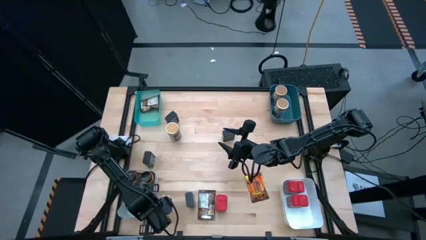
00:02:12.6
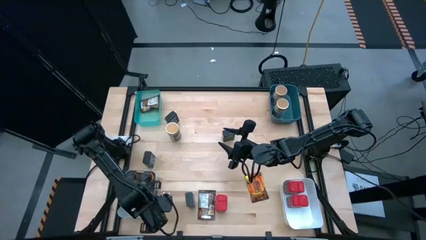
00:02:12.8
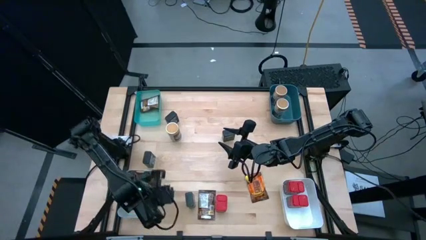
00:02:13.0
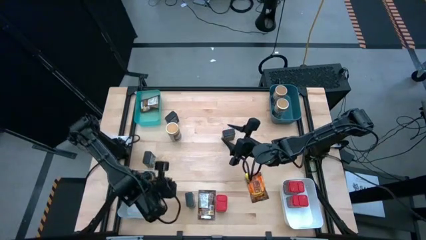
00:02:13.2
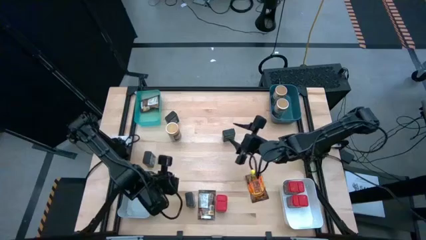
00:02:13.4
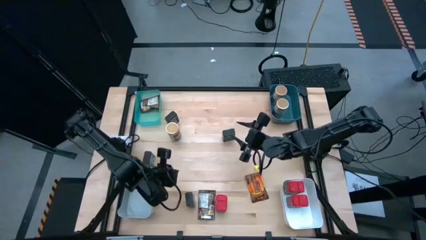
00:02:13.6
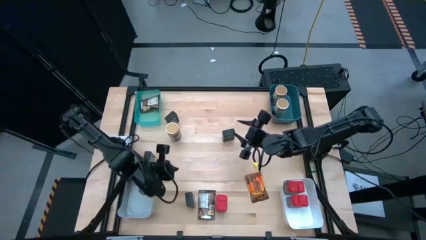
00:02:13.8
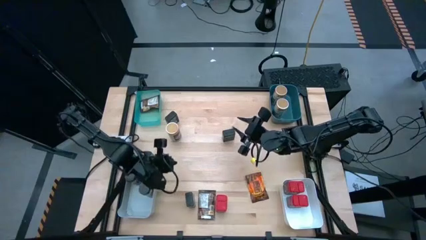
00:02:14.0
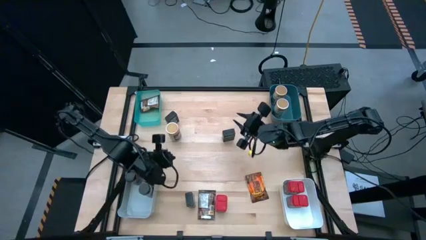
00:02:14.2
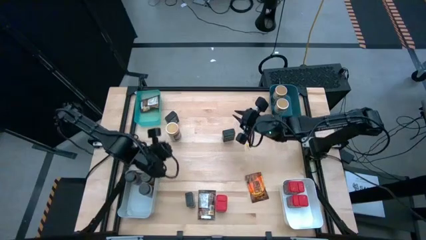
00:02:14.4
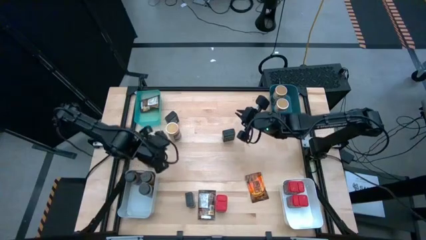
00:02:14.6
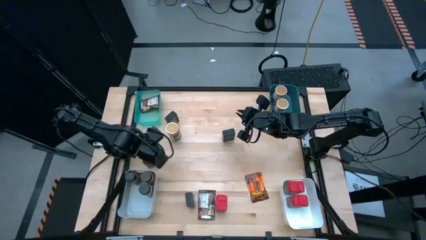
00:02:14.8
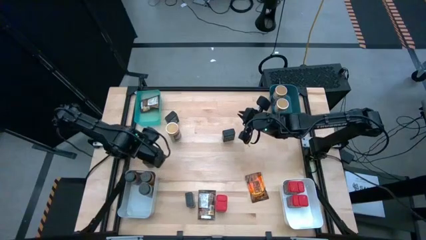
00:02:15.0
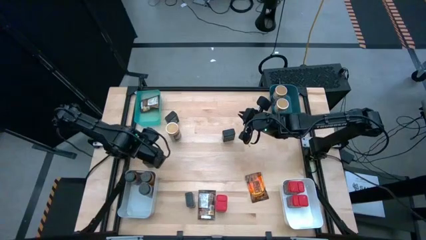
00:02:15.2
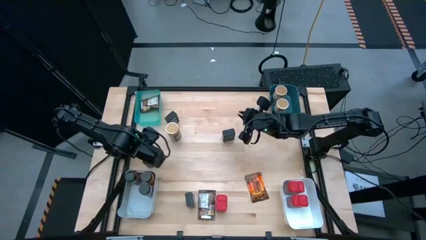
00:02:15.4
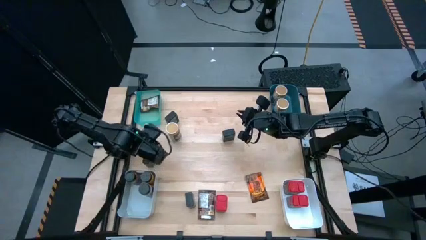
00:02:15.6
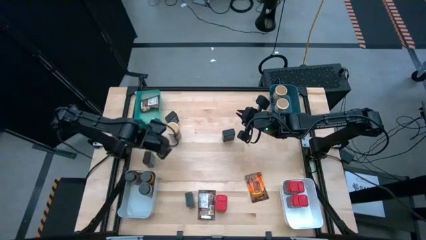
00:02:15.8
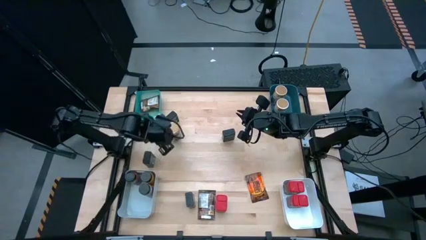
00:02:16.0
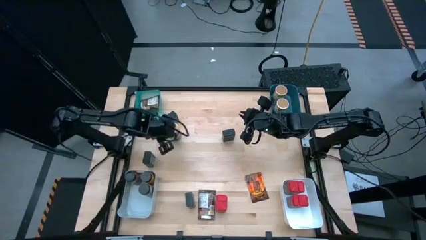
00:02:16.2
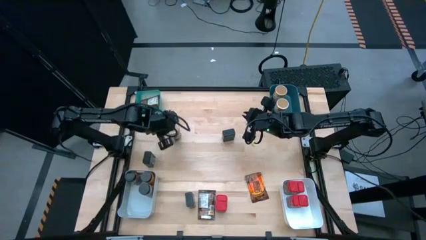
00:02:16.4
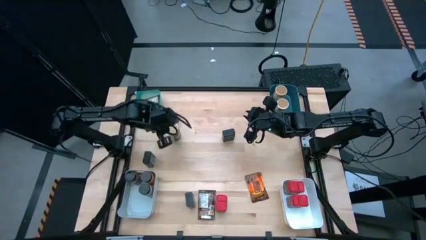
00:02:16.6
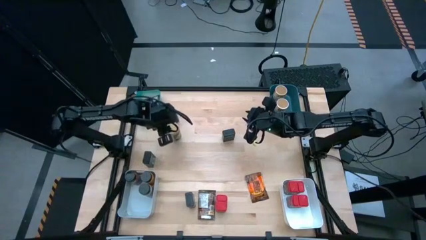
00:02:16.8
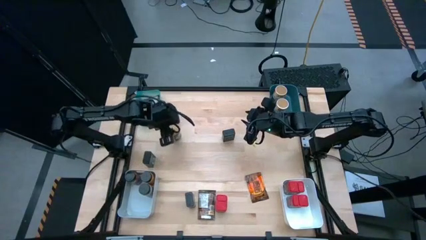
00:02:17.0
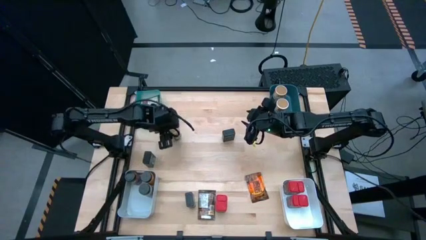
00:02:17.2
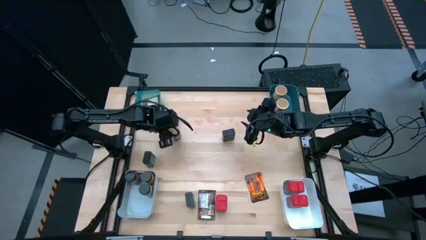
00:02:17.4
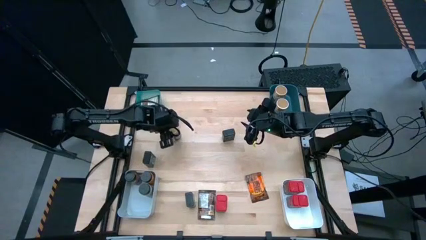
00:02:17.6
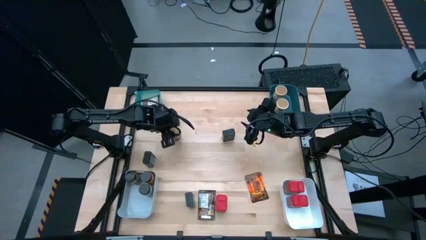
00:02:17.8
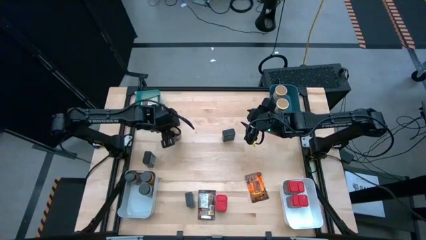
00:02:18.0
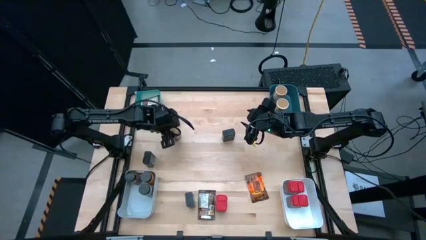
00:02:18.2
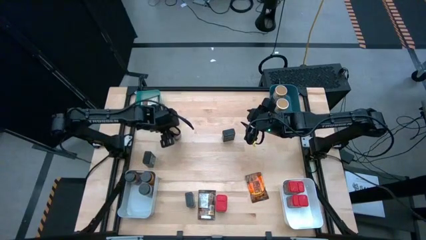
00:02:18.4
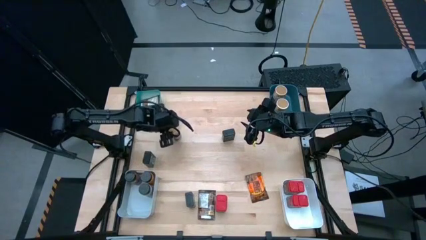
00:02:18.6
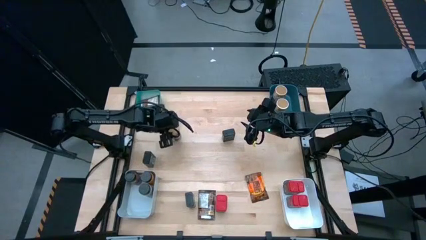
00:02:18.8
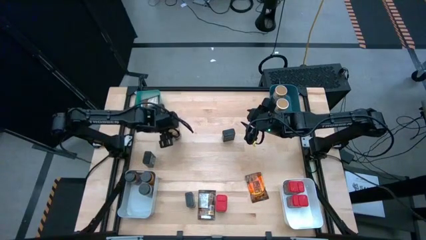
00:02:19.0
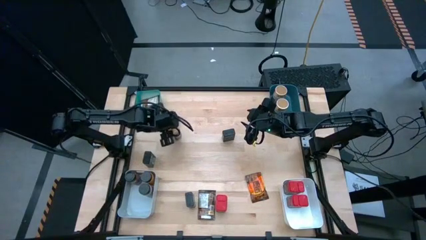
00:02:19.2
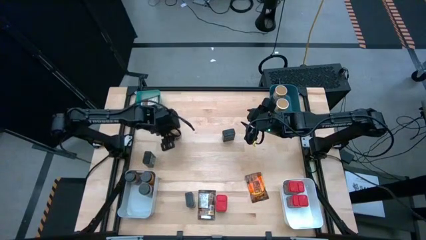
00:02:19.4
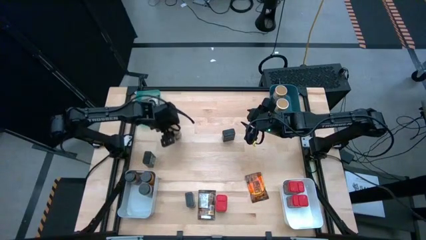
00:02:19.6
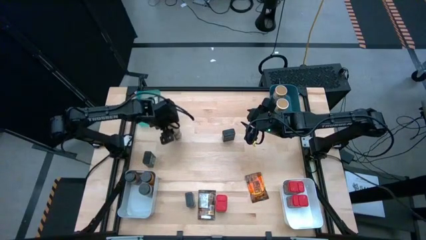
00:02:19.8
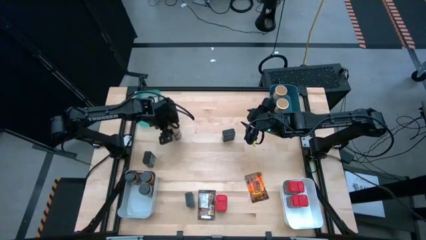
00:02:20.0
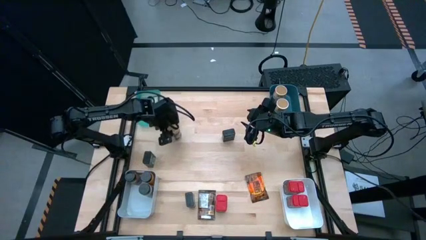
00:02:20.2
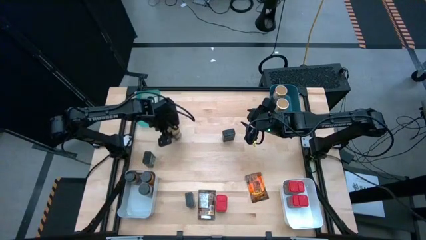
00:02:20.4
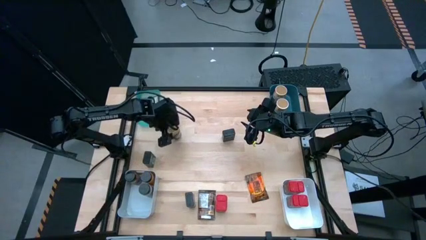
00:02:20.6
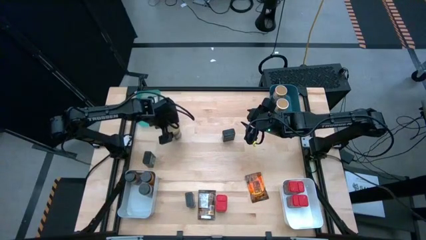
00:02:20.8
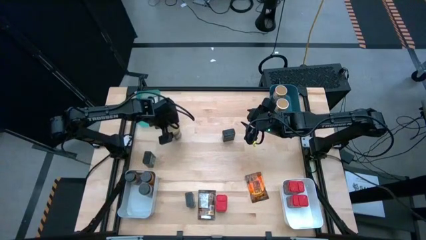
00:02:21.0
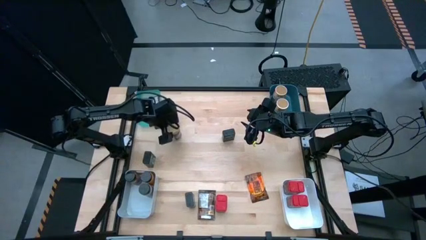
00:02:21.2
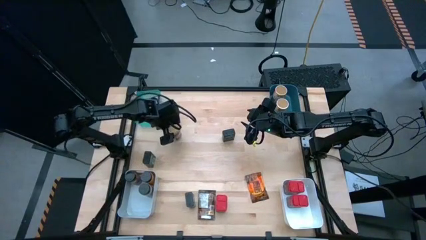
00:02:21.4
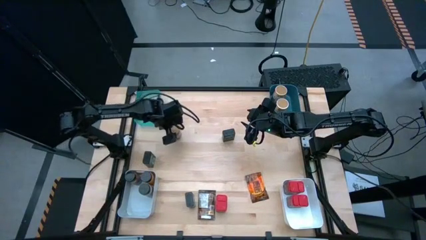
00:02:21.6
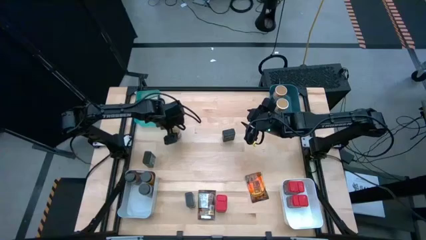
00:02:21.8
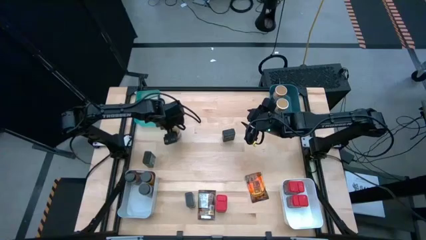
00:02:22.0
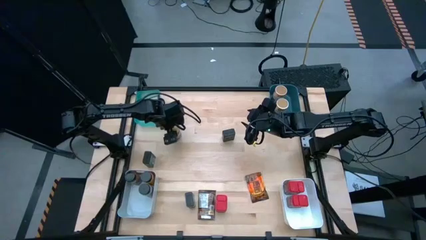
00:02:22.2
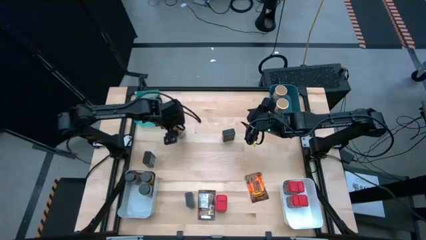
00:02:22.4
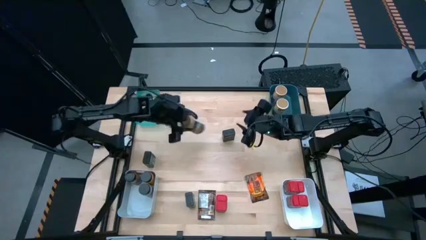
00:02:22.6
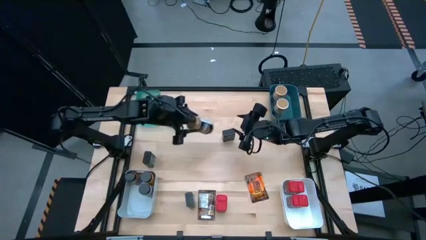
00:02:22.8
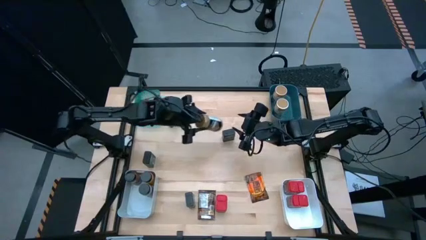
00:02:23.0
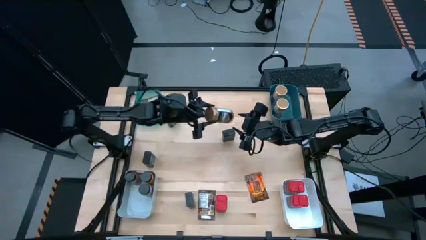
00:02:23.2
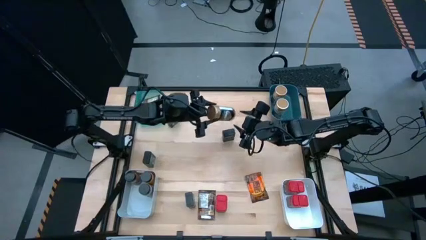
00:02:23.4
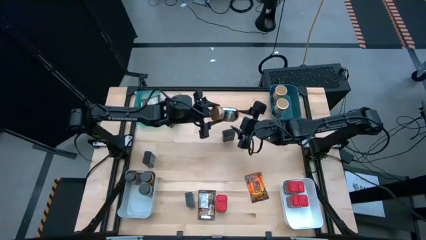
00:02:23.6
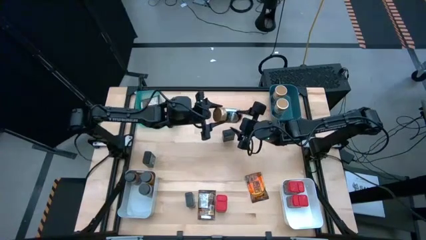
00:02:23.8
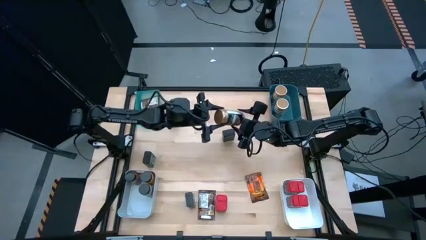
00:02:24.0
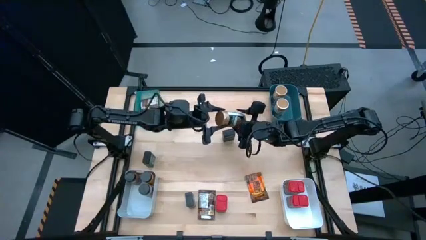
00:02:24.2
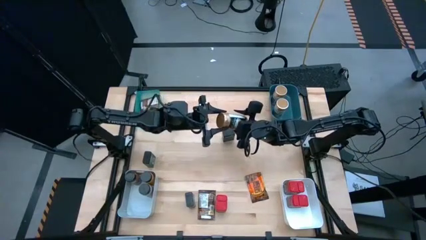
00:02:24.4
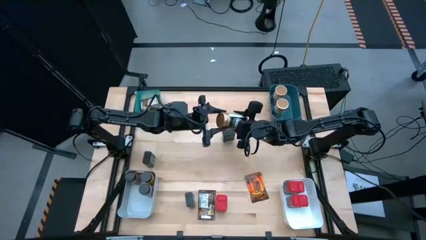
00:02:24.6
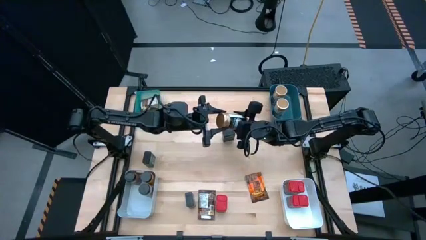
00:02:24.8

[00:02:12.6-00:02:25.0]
Task: Sort spices by type
Put the brown seasoning bottle into the dark green bin
